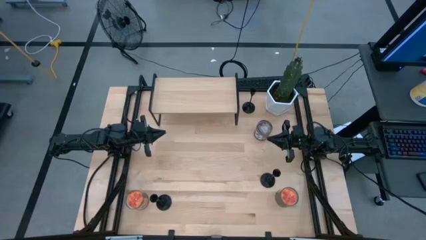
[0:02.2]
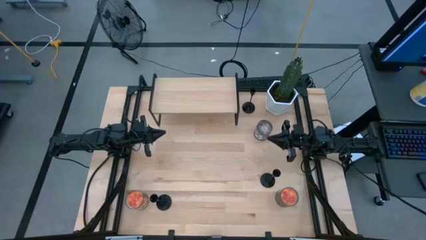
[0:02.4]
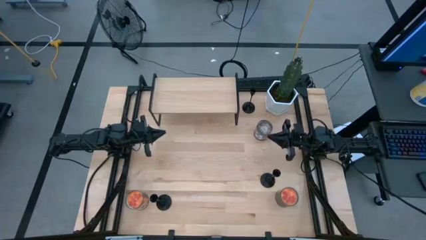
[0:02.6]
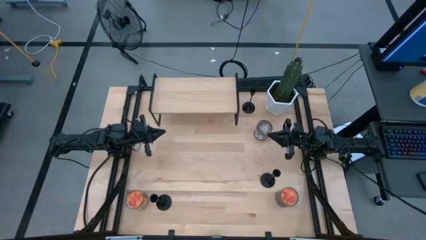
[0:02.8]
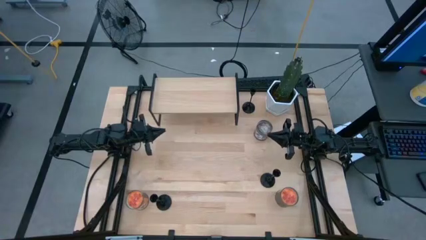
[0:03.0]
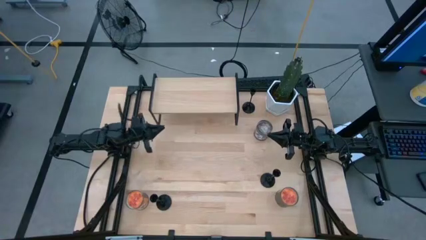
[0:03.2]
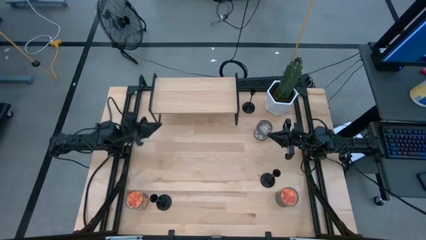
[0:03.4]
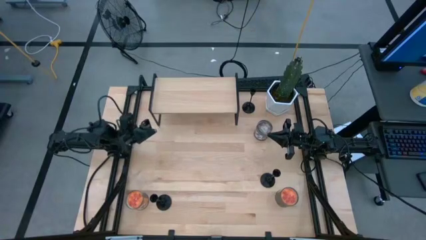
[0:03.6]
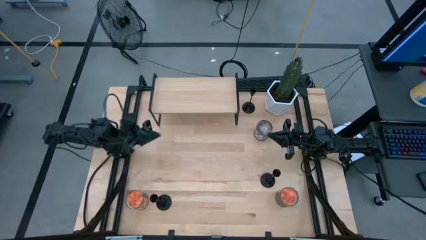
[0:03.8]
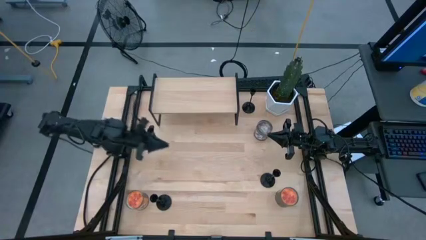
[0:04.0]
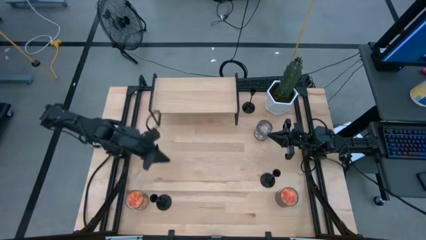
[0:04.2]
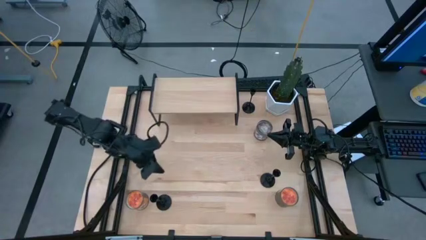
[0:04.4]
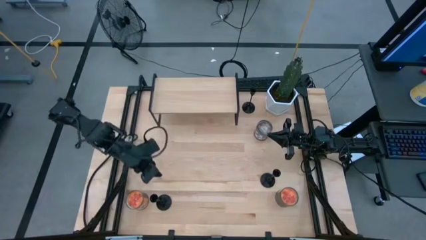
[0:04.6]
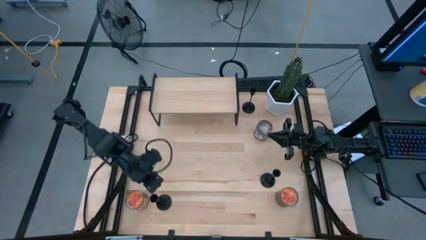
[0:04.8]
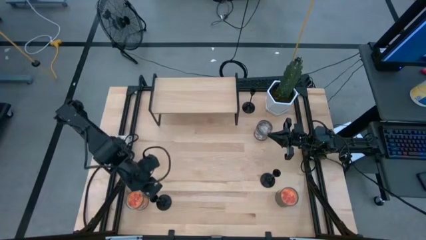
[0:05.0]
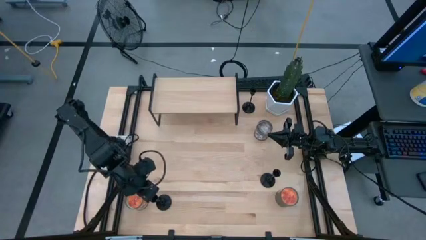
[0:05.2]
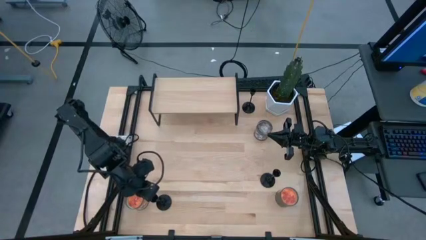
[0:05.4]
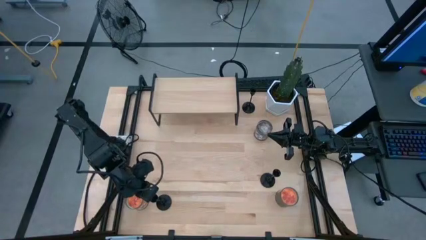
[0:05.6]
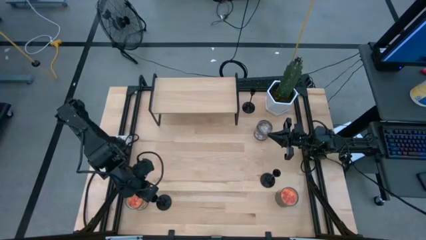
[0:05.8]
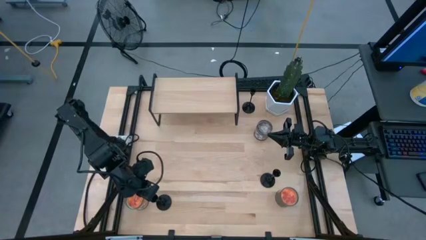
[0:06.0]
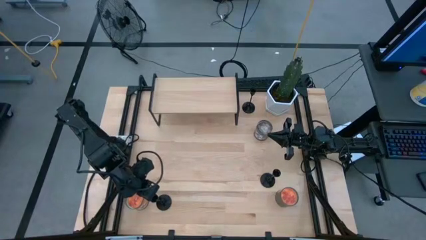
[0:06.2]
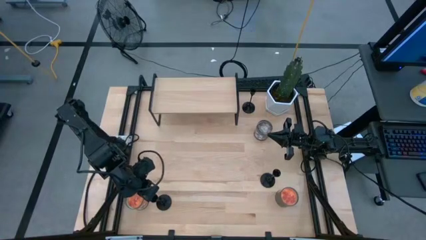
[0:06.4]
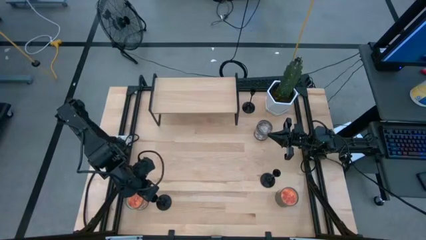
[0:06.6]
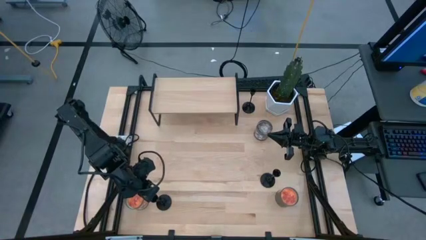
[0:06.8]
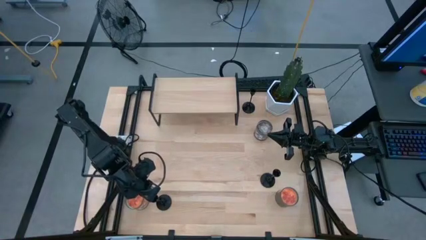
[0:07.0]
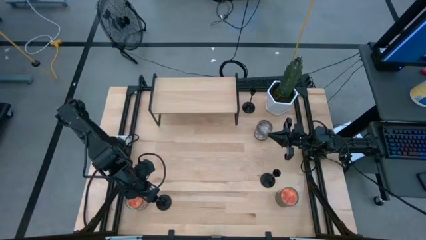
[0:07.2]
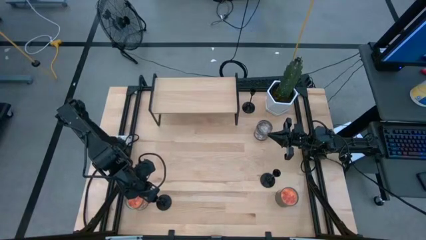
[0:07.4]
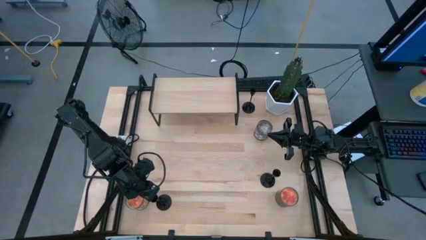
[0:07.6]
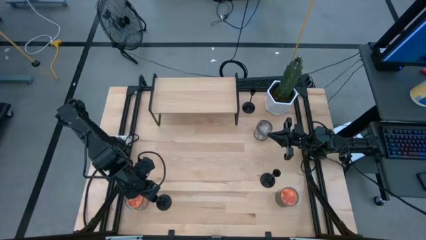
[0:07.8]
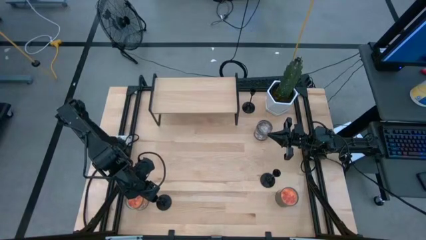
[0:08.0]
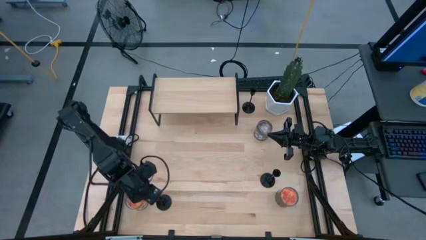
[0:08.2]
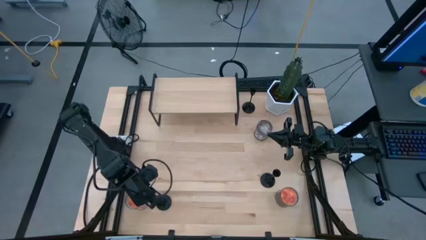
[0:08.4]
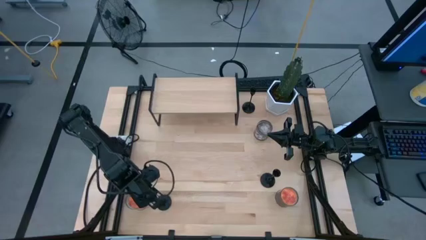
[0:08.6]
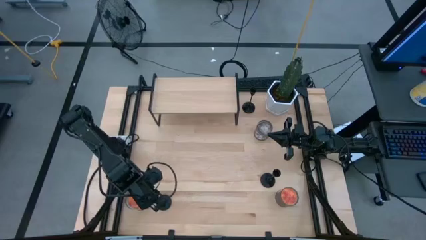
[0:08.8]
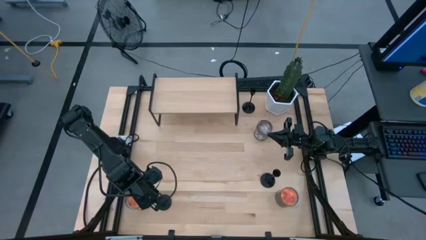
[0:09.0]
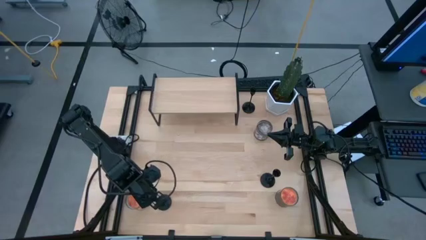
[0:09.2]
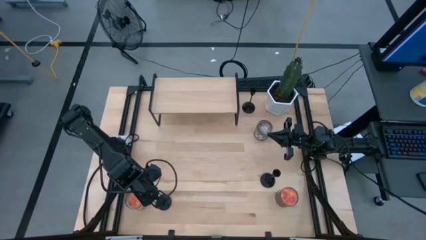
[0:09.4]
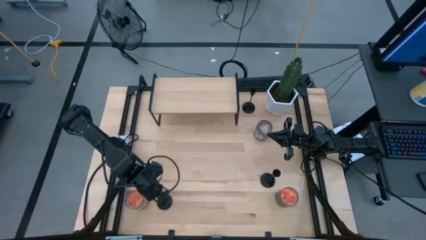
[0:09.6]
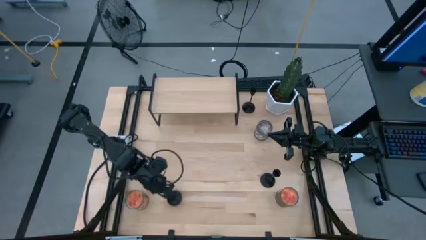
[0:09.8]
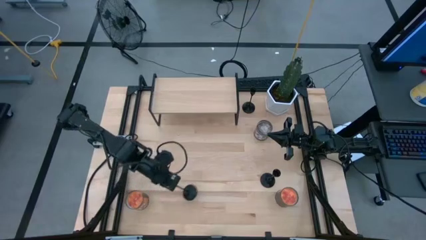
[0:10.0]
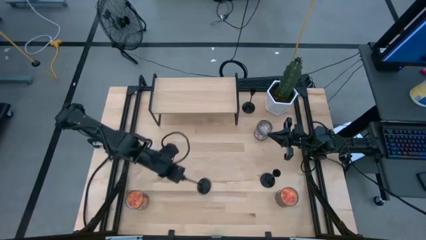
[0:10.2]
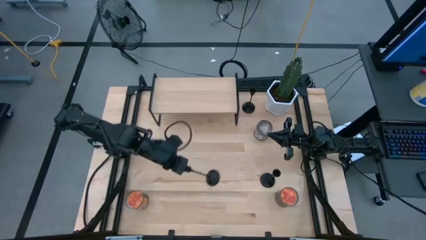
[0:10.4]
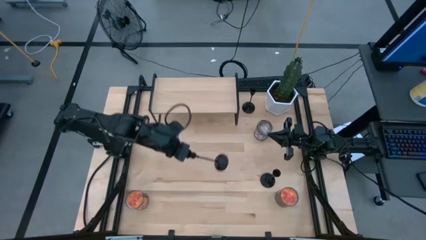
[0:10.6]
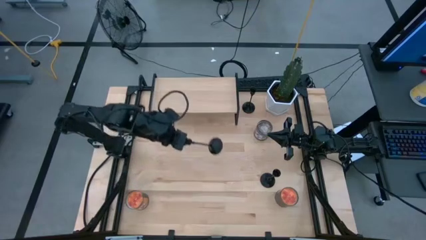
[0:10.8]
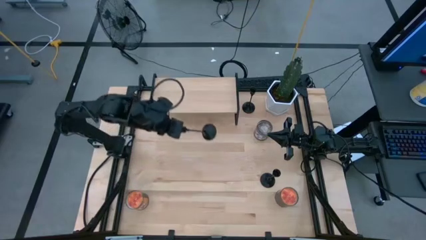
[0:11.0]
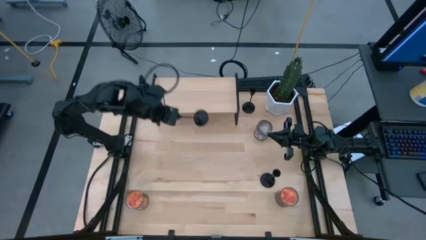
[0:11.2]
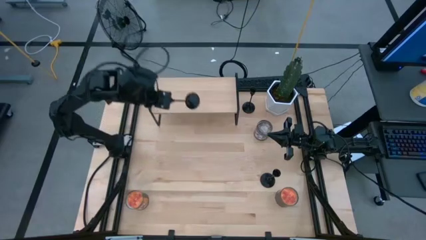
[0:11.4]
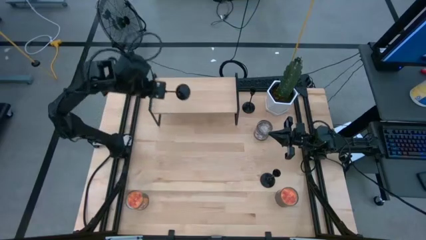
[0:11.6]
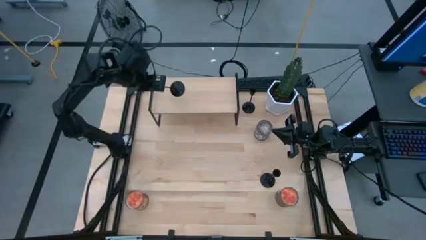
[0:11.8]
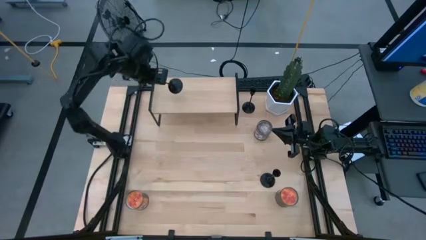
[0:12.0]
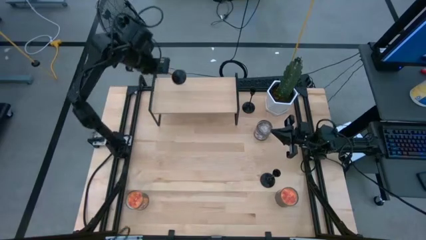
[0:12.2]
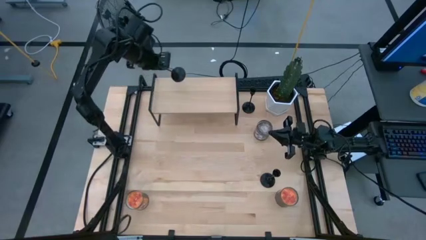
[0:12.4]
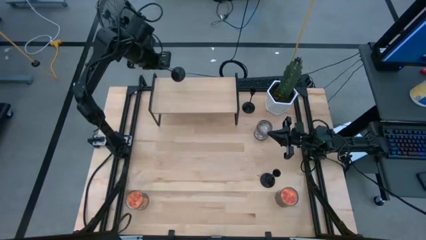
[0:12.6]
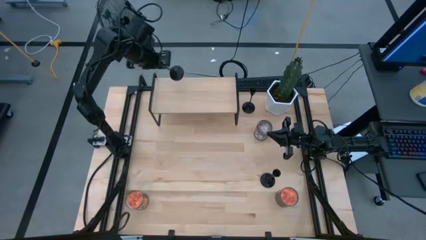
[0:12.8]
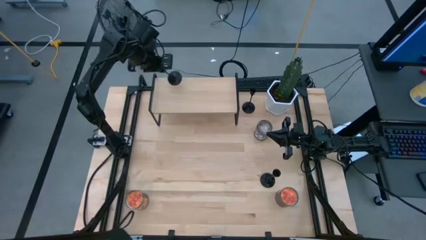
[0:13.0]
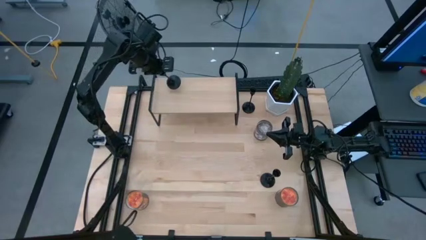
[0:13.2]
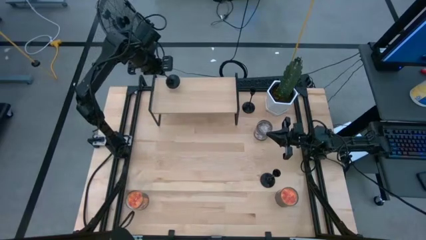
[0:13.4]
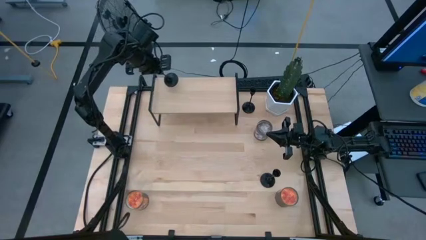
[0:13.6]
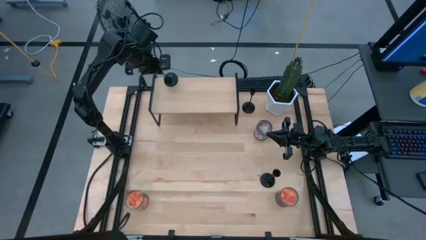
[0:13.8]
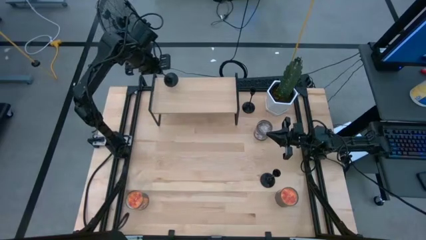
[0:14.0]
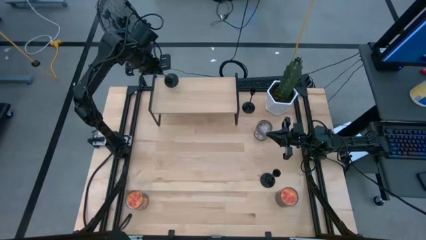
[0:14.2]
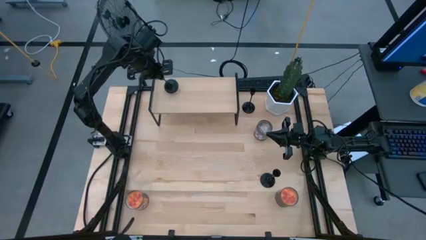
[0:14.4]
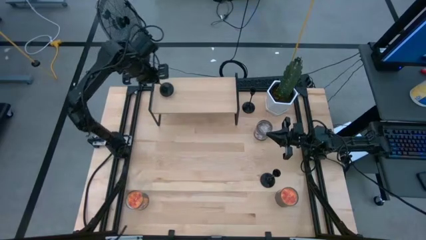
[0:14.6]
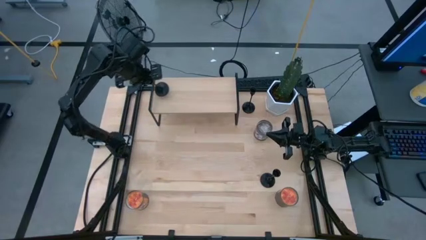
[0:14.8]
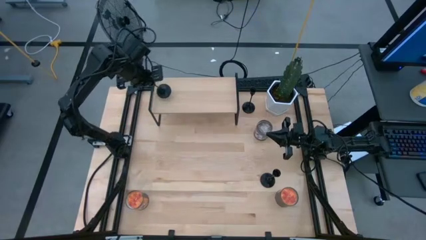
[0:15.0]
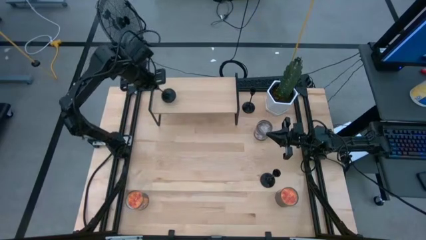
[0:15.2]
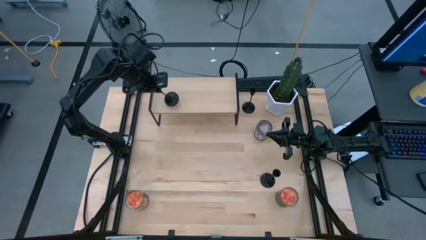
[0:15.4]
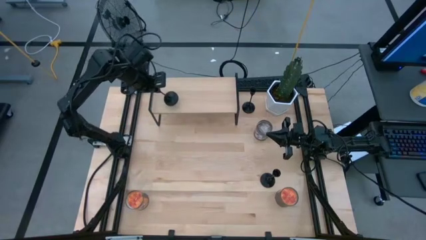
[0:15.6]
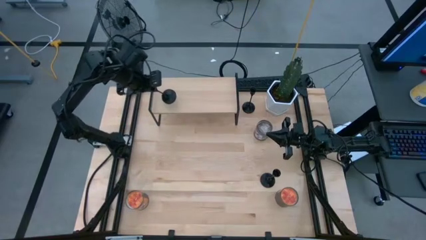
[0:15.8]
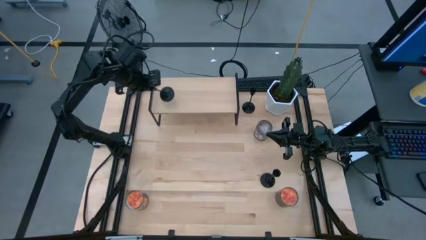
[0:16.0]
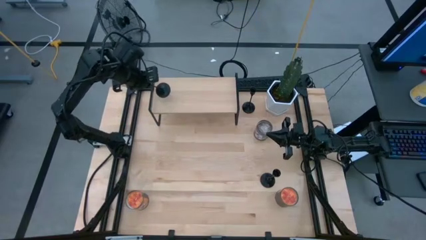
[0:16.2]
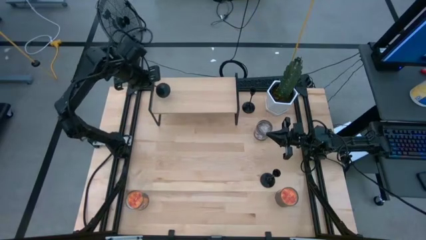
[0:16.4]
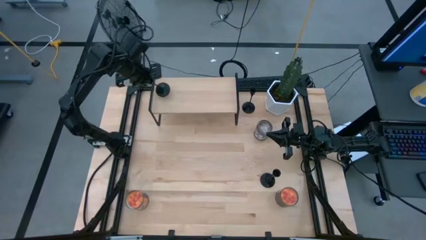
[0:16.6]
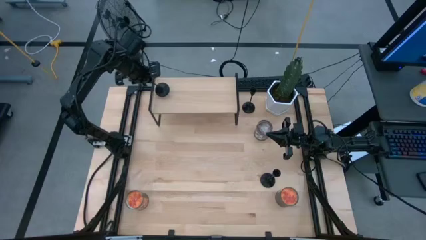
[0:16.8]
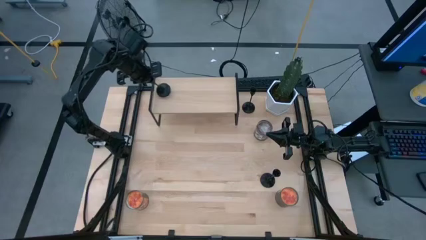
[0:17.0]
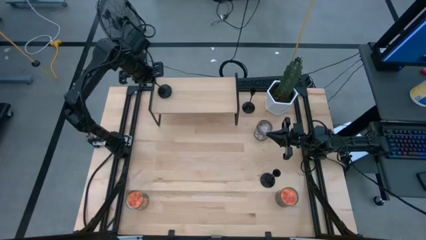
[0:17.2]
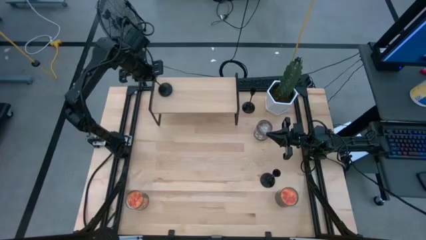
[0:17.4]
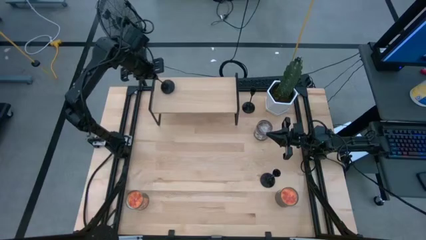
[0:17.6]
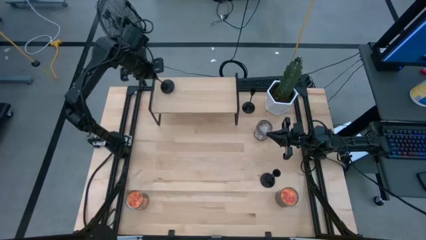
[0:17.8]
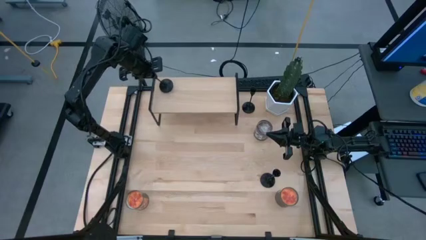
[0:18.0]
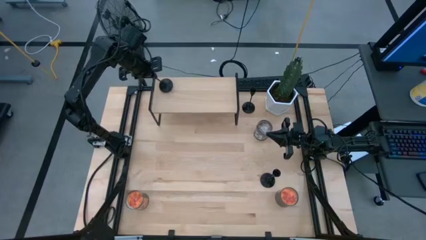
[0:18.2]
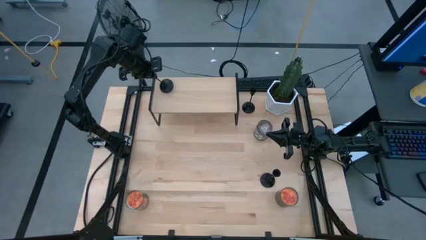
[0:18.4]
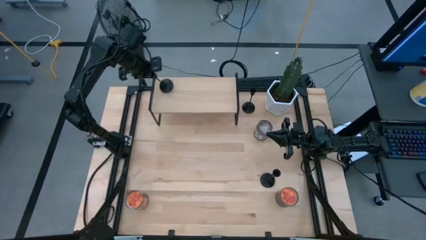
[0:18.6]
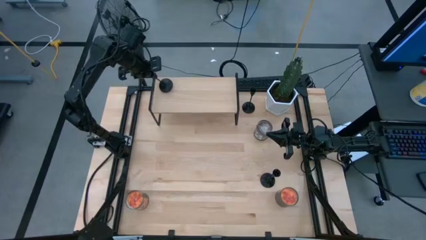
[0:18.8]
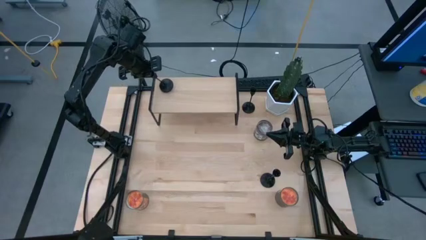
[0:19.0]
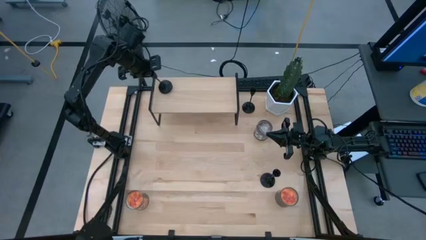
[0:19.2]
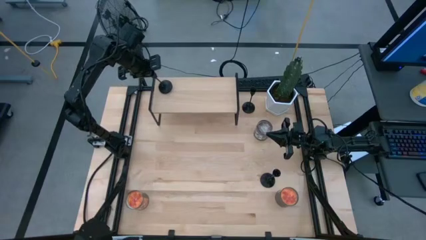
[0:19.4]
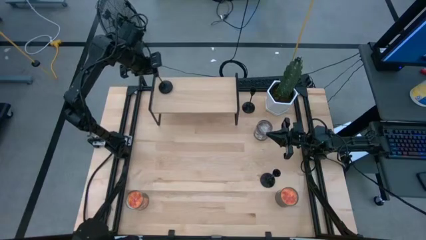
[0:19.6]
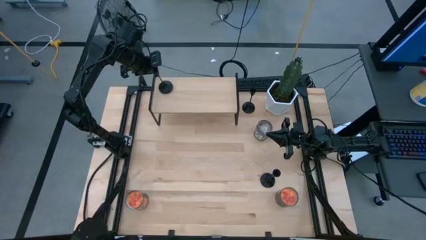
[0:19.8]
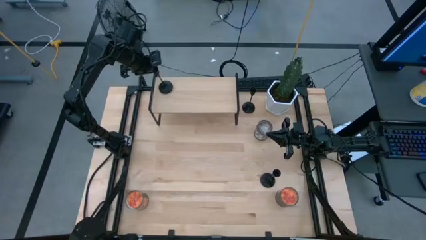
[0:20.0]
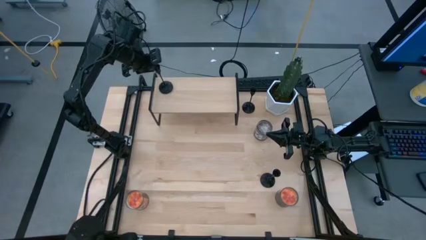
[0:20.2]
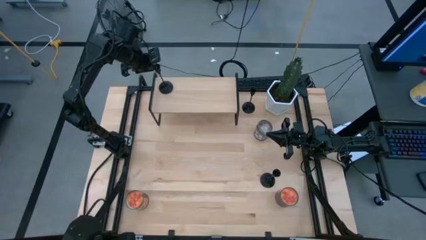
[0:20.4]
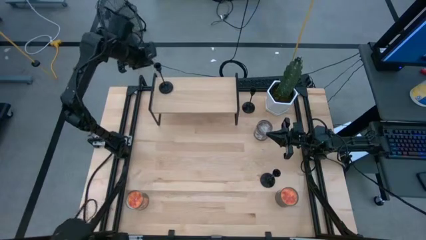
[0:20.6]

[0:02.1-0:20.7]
Task: Pick & Place candle stick holders
Put the bottom black candle holder on the shelf
